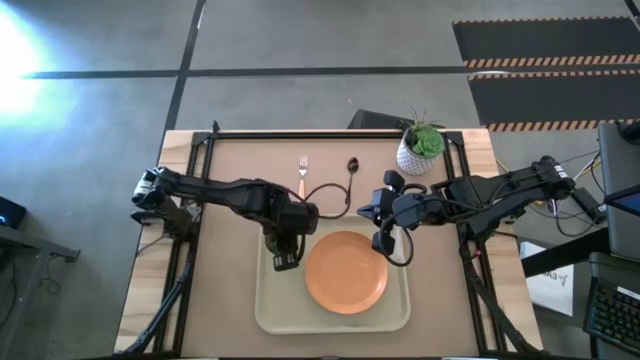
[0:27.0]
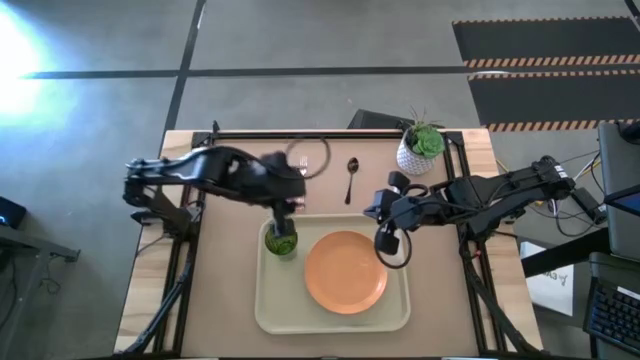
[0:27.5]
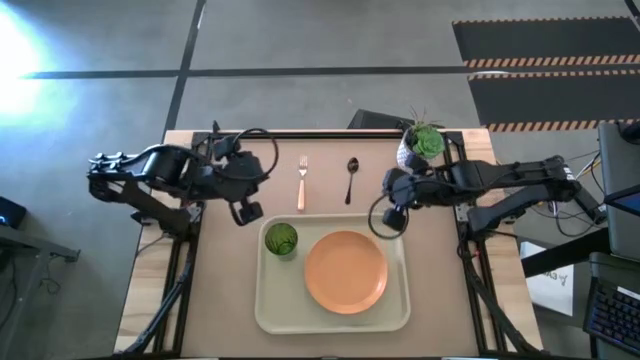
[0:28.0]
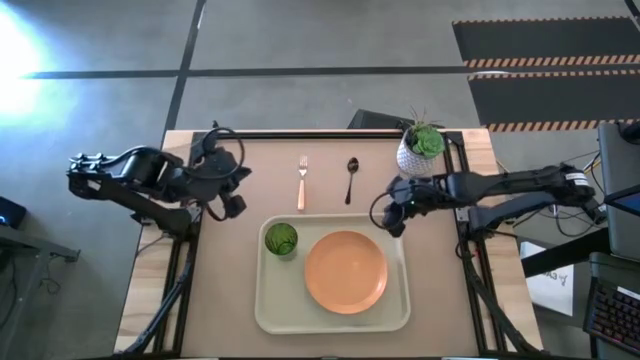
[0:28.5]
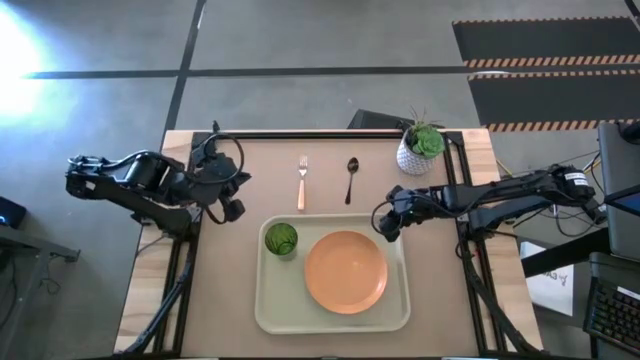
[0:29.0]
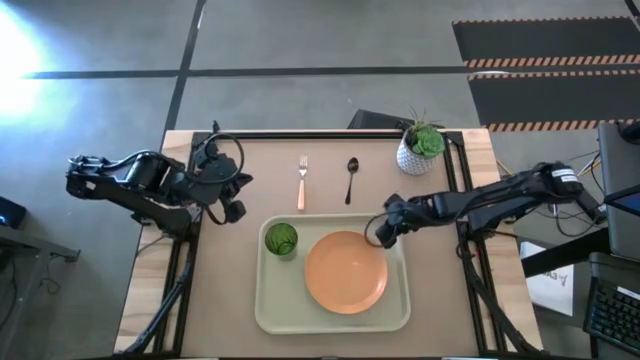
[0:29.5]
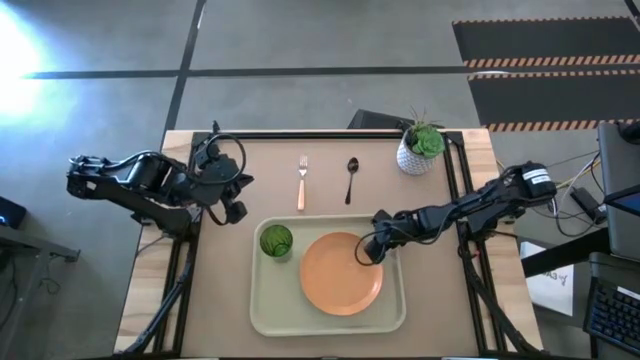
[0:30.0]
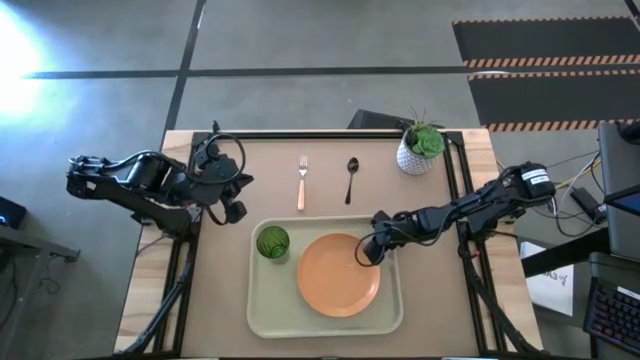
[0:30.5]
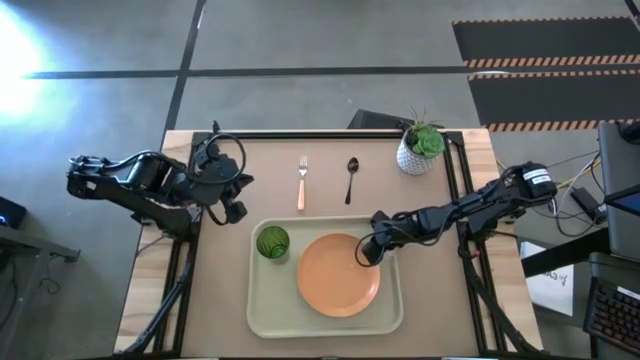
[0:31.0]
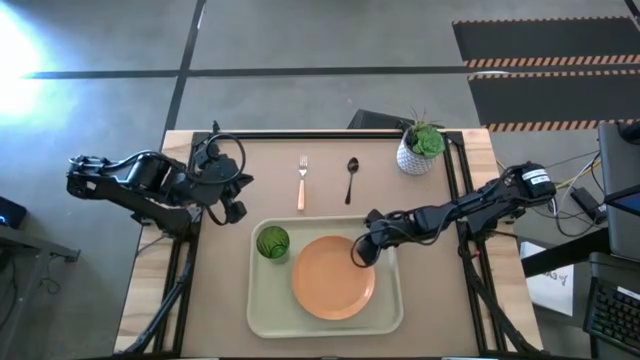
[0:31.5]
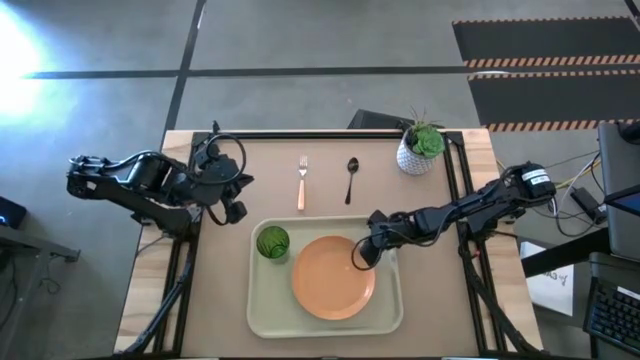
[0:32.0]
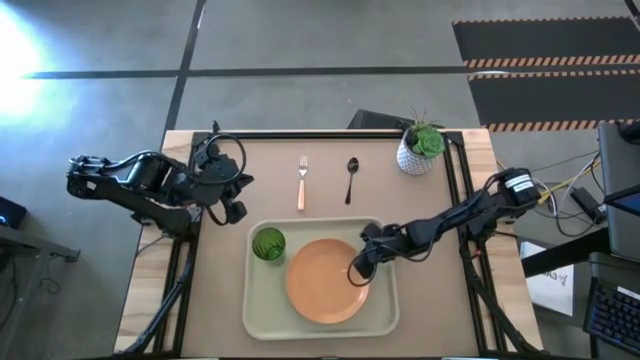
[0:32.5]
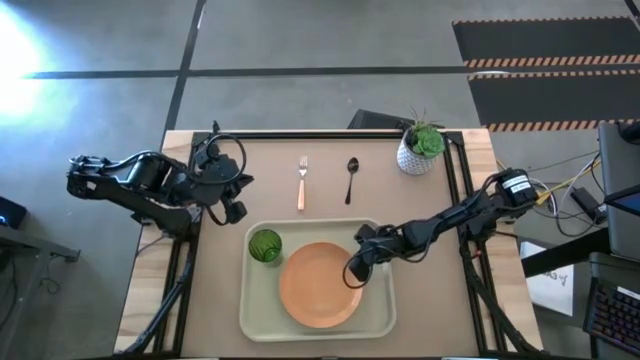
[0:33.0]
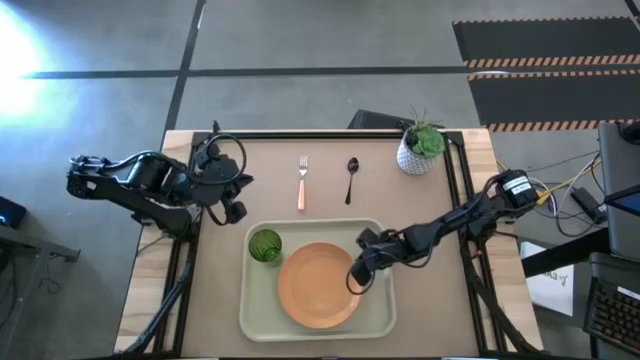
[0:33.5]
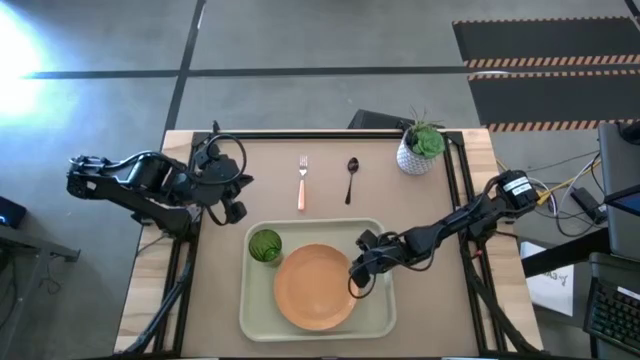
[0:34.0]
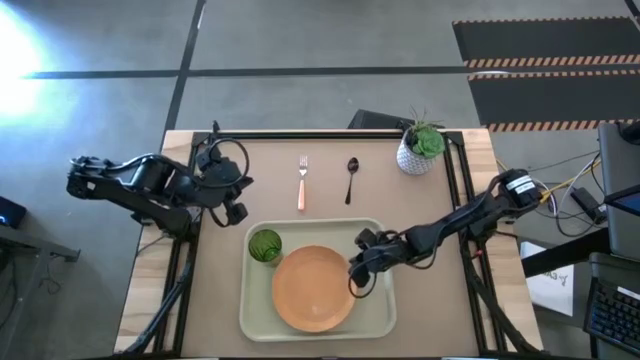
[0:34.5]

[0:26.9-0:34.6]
Task: Pick and place plate/cup/fork/spoon on tray
Adjust the orange plate

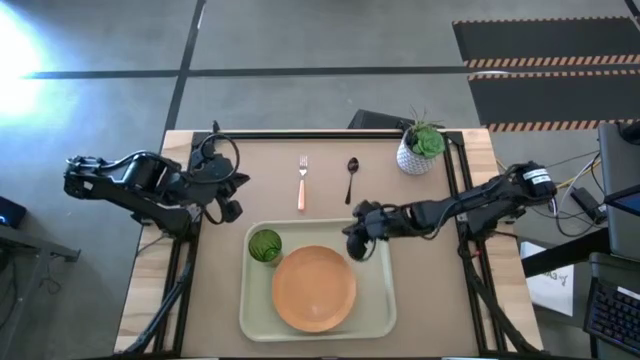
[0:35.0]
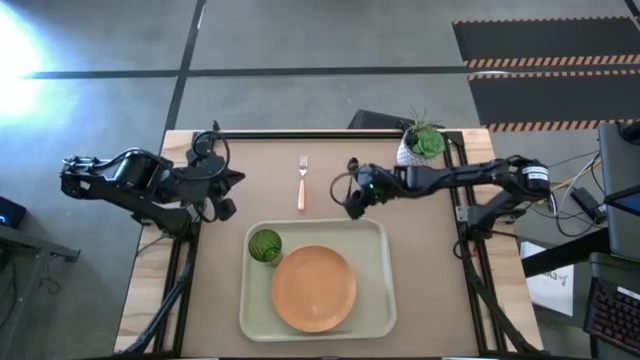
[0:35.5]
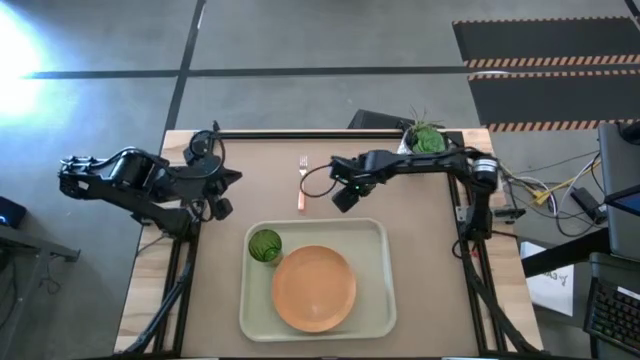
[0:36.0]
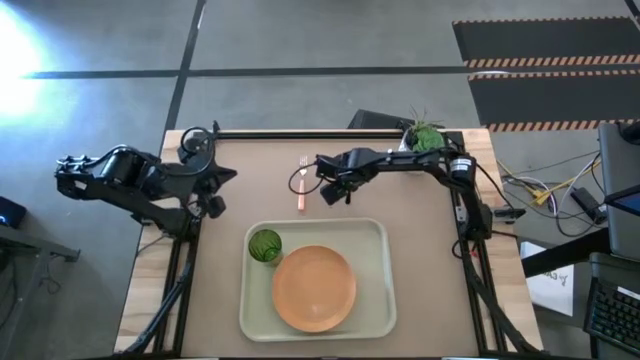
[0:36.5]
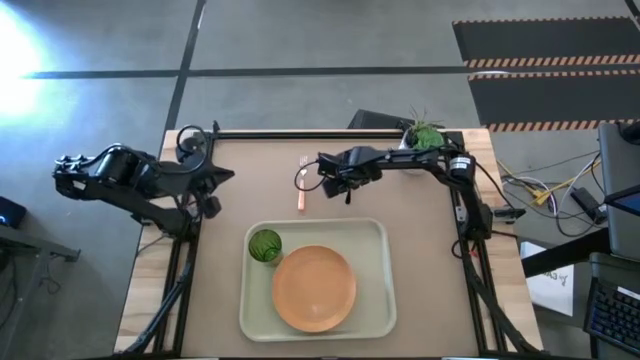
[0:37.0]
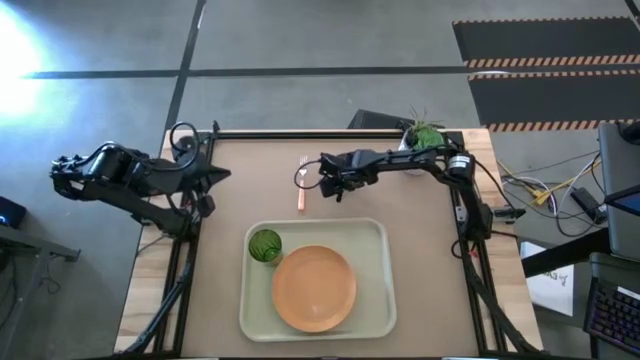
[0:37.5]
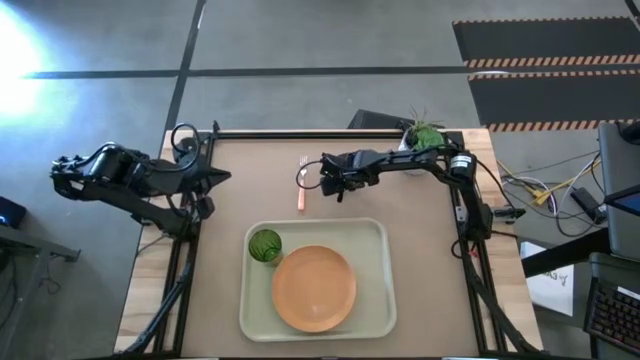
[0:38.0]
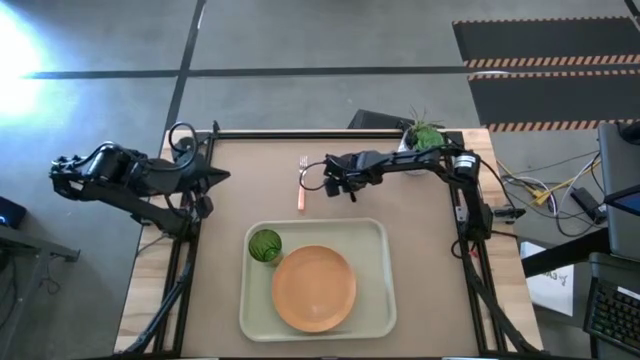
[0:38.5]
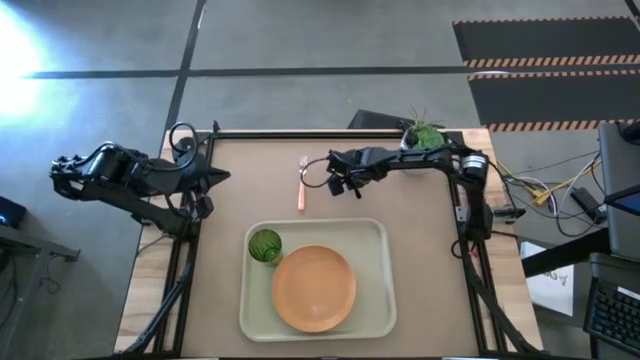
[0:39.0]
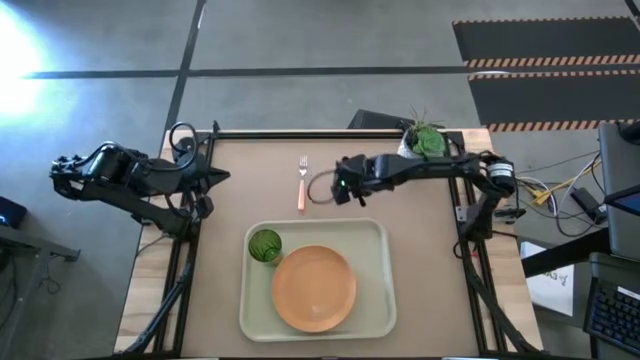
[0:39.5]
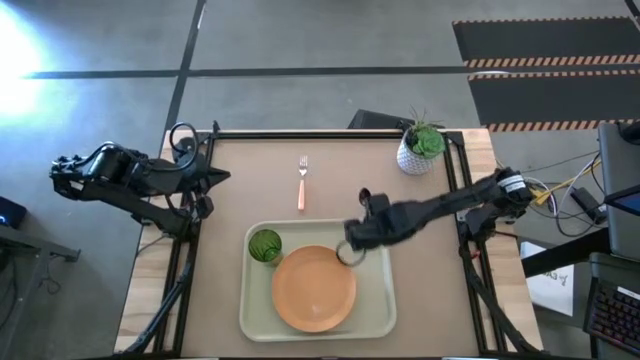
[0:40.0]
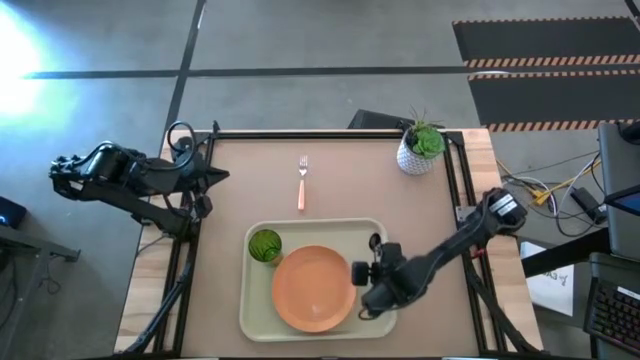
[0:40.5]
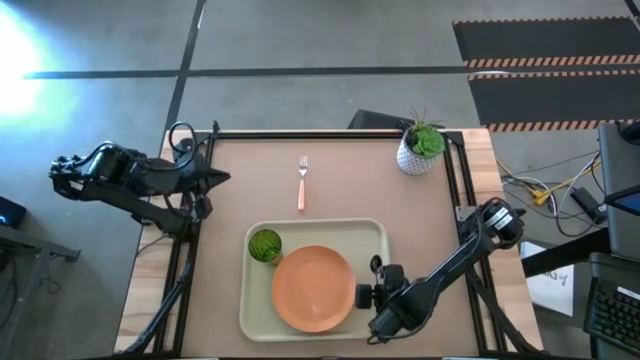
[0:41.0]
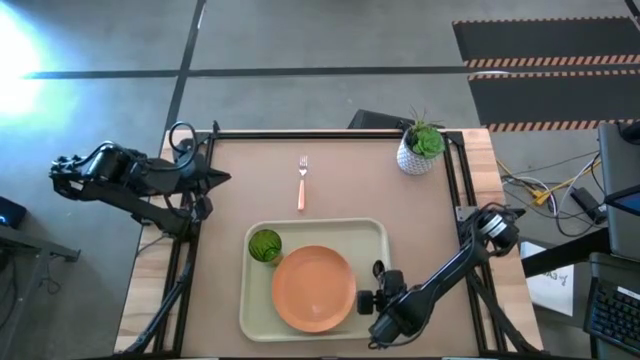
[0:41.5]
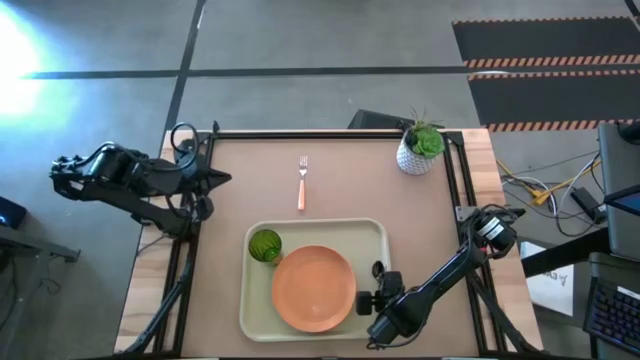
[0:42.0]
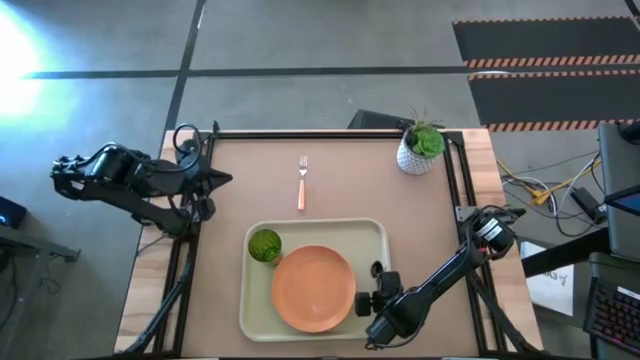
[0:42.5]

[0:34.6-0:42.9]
Put the black spoon on the right side of the orange plate

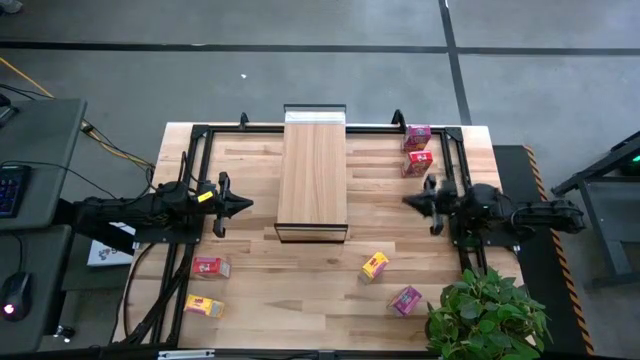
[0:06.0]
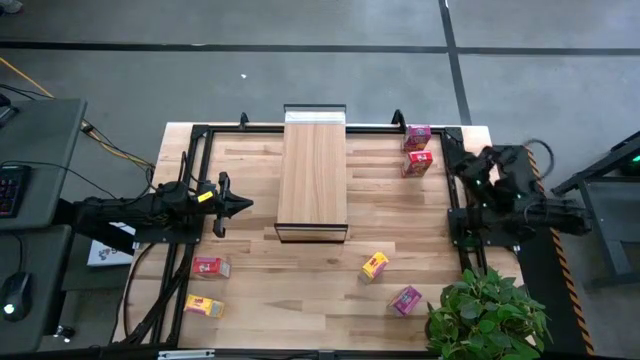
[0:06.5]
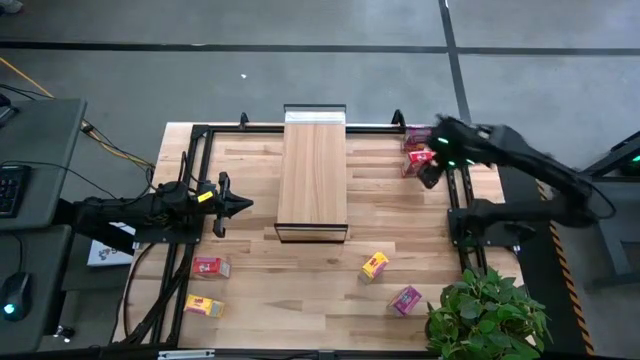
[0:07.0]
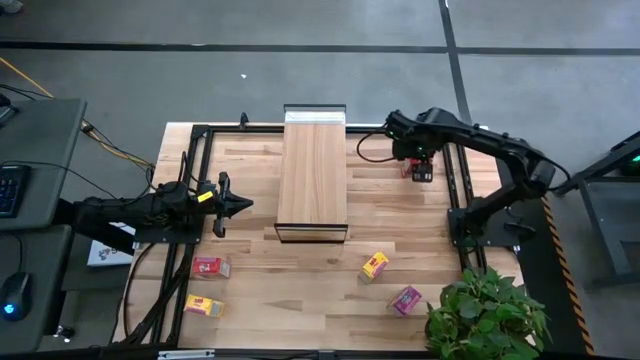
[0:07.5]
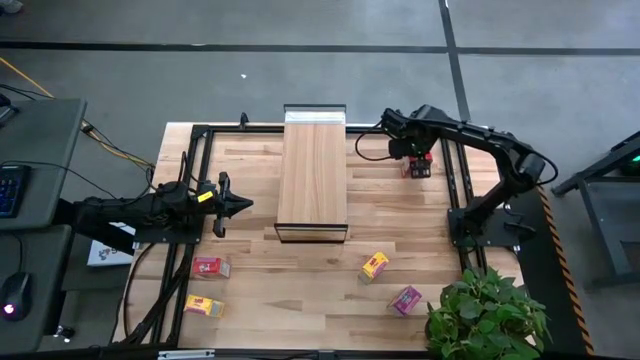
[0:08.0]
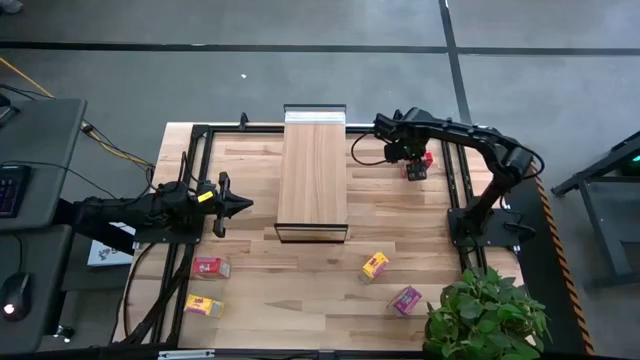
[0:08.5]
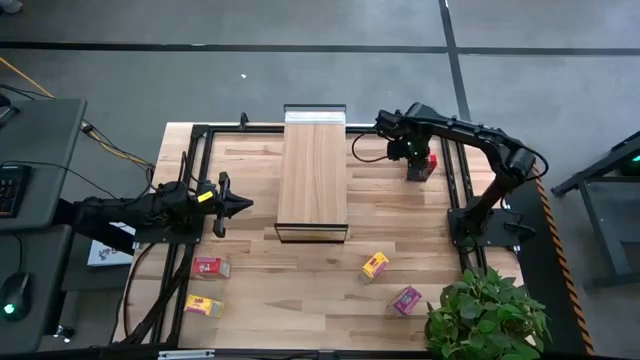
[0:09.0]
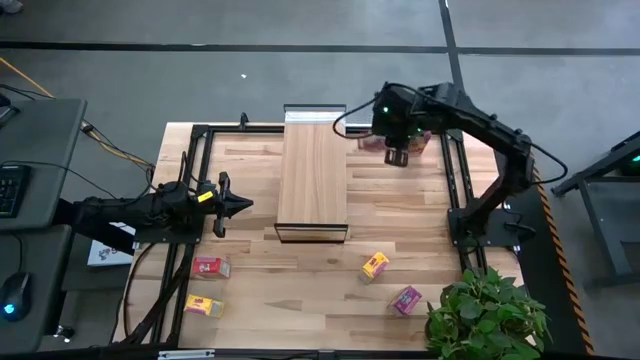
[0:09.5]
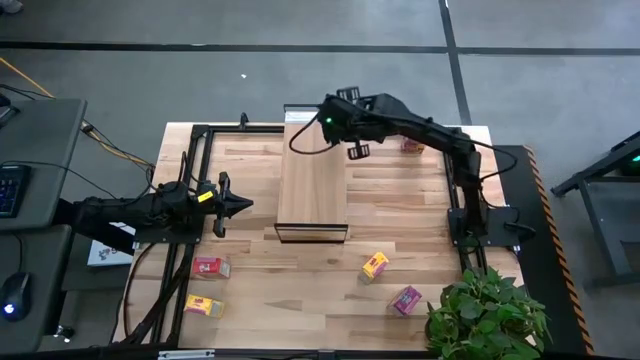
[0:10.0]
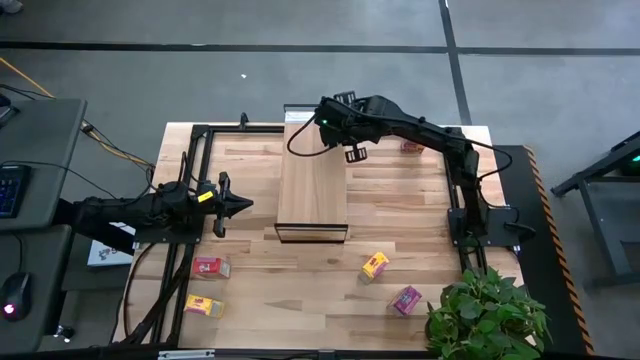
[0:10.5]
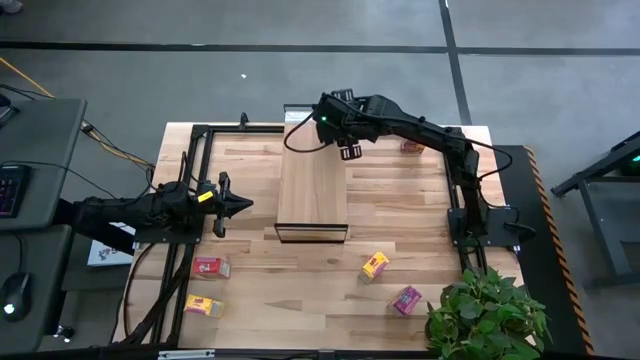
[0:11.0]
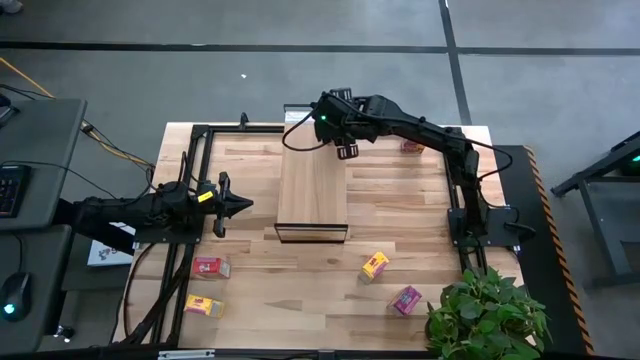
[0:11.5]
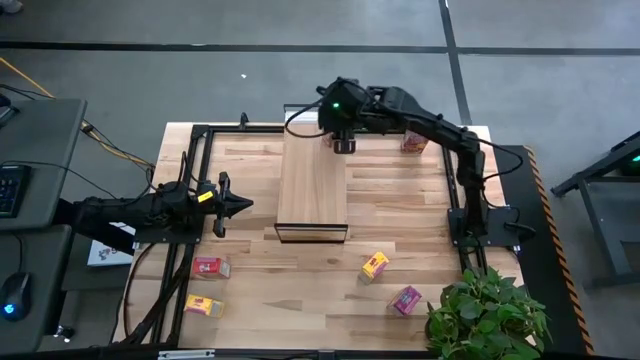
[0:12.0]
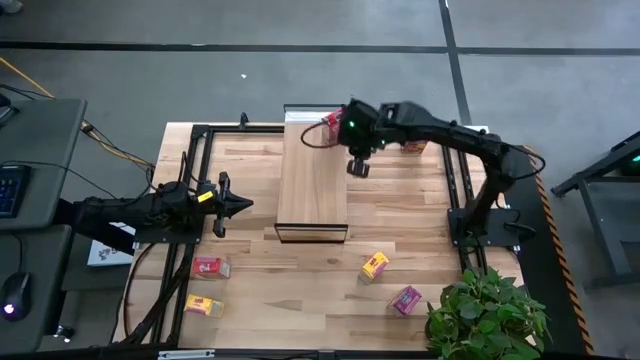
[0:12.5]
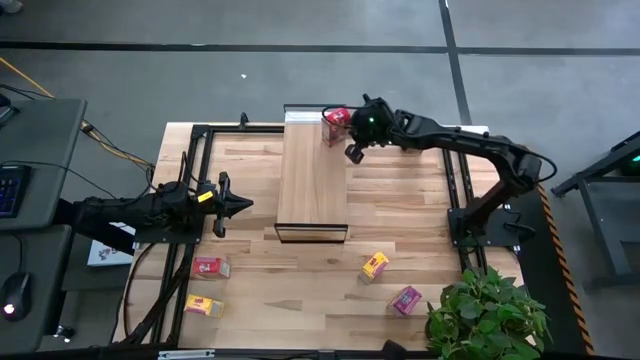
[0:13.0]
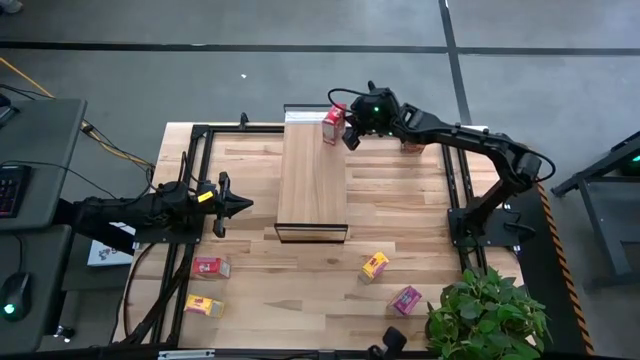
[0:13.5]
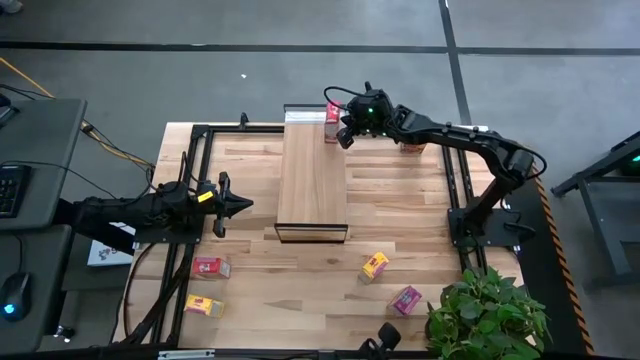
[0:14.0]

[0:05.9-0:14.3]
Task: Stack cereal on shelf
Put the top red cereal box on the shelf
